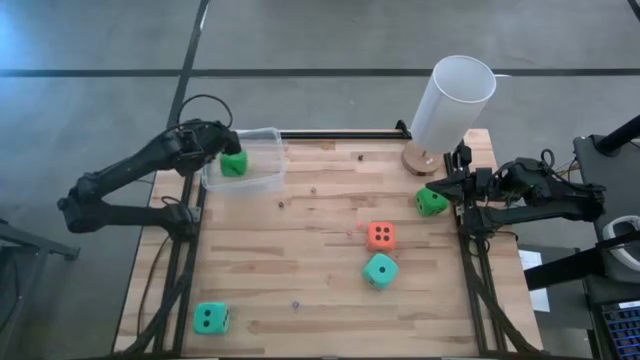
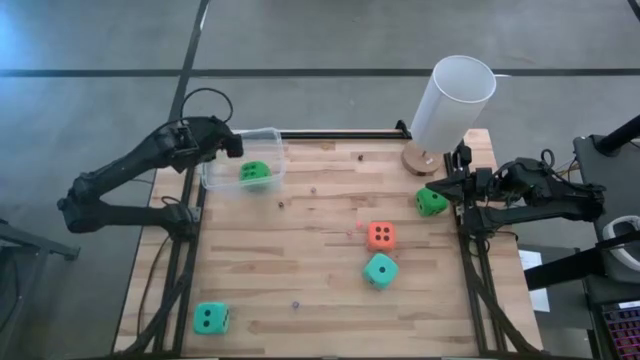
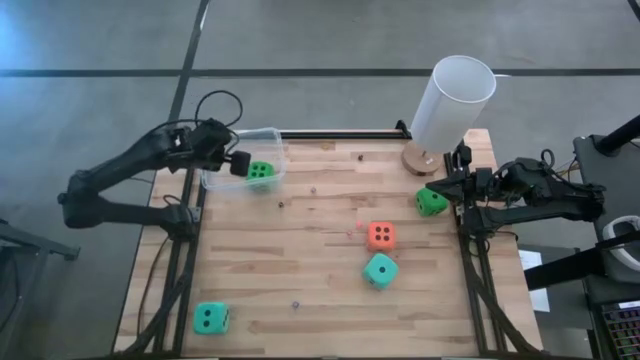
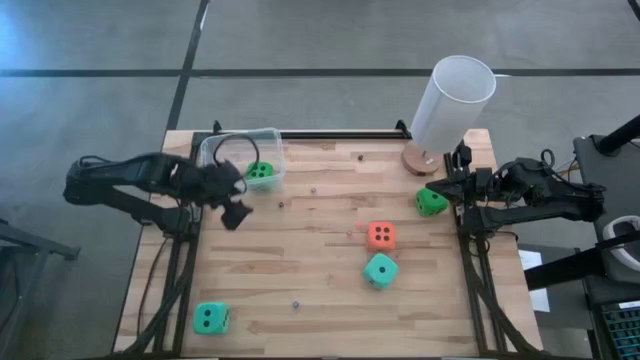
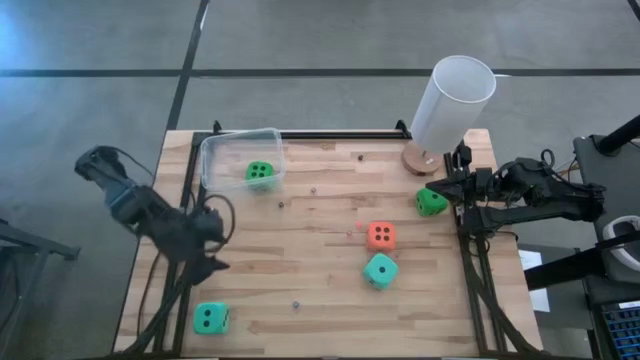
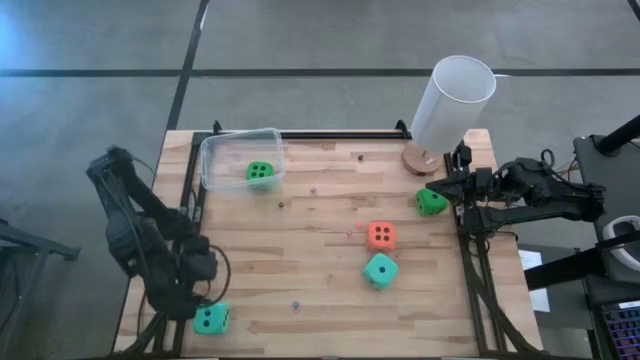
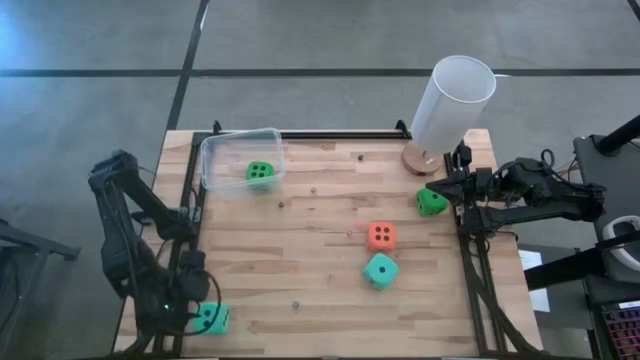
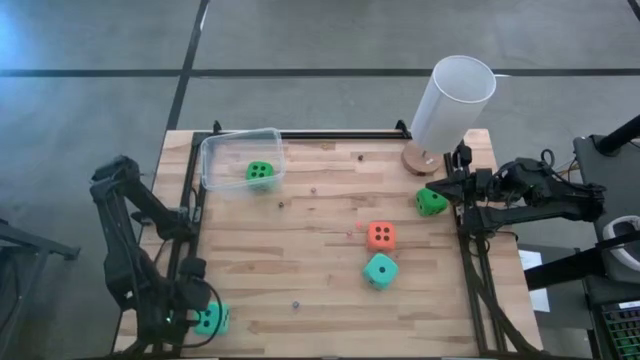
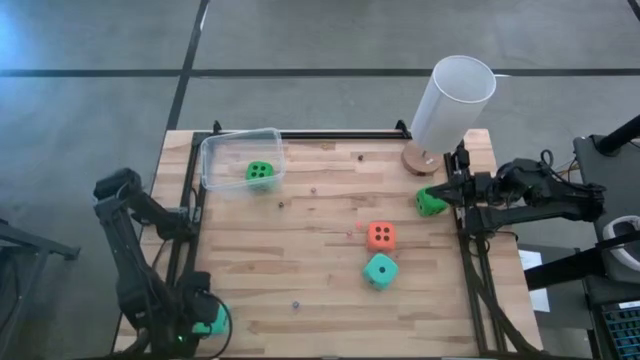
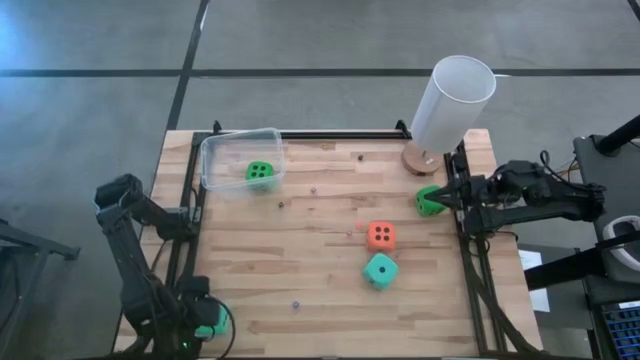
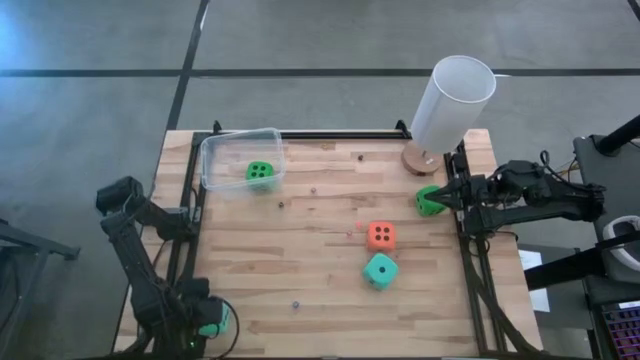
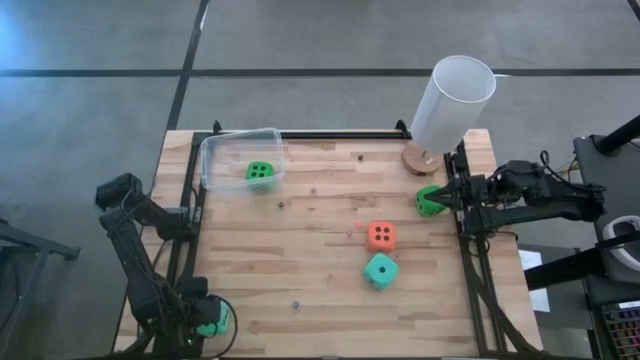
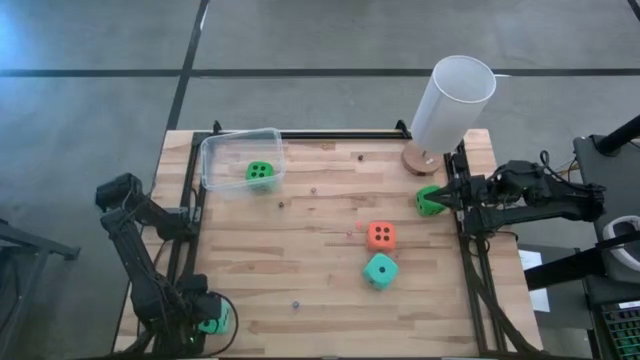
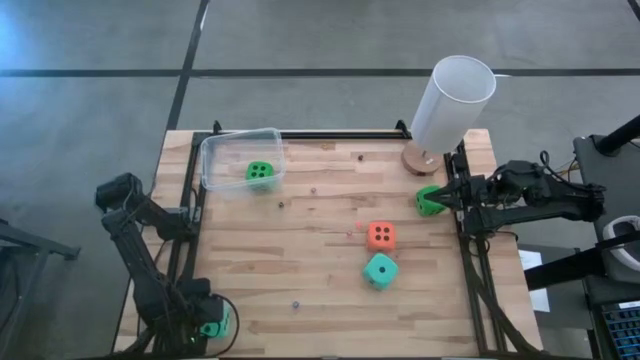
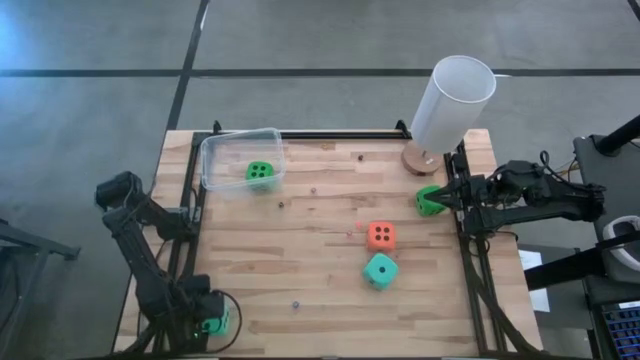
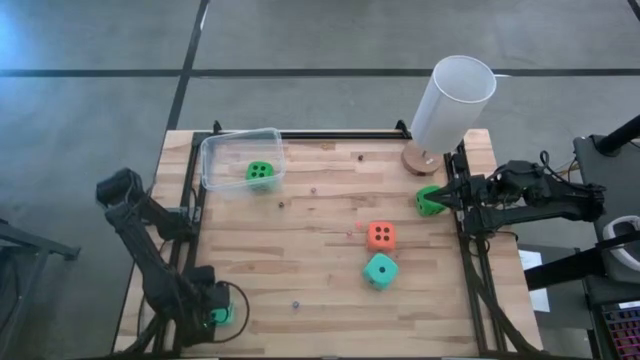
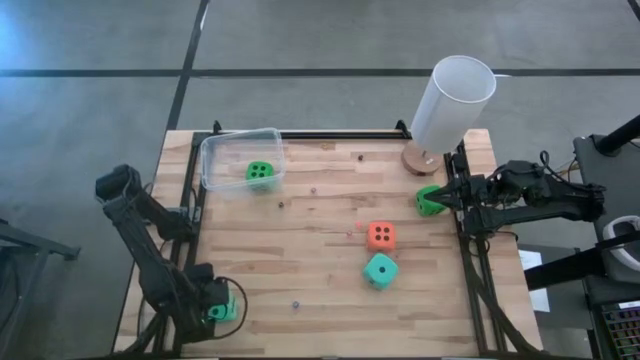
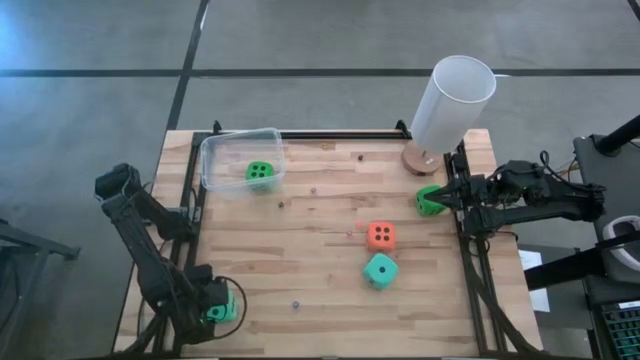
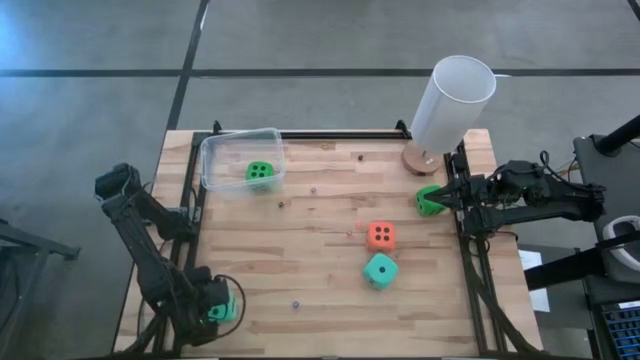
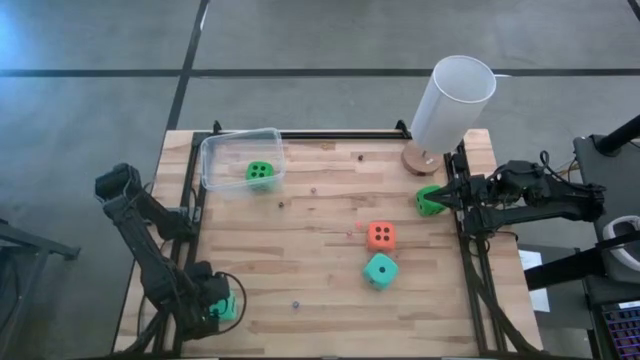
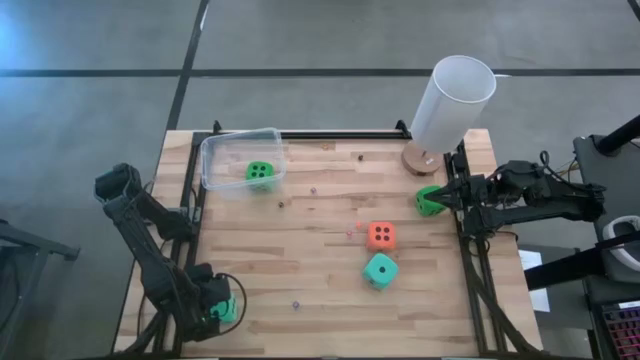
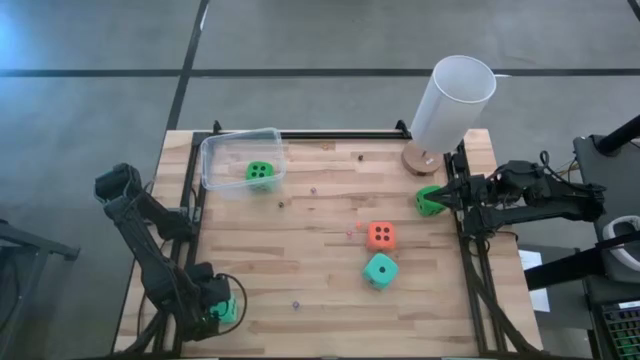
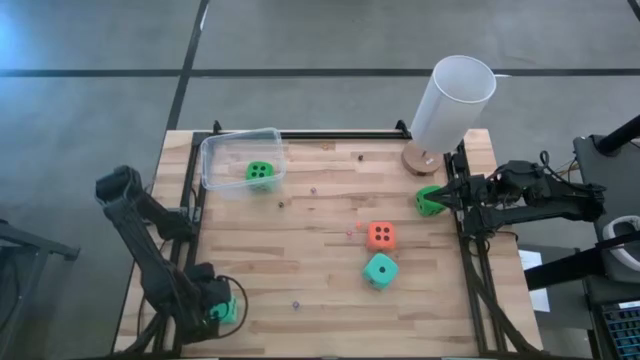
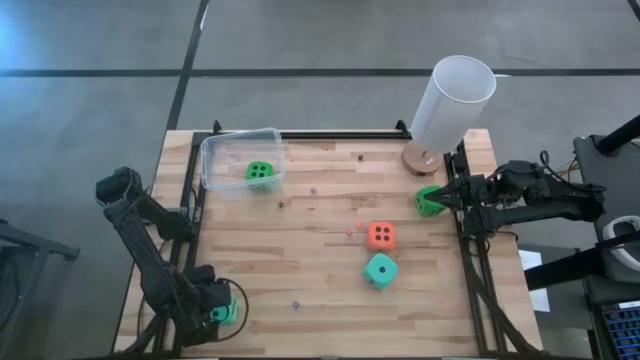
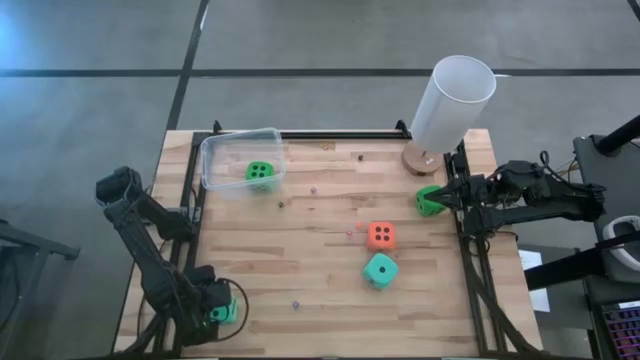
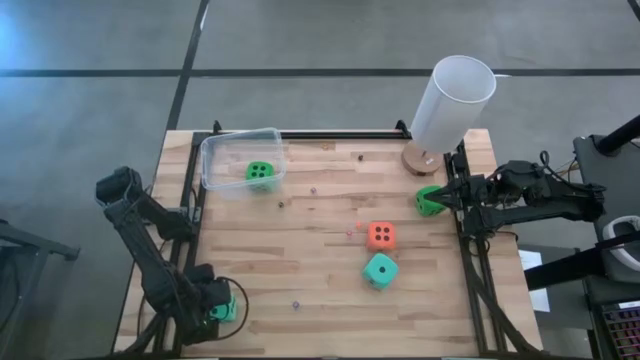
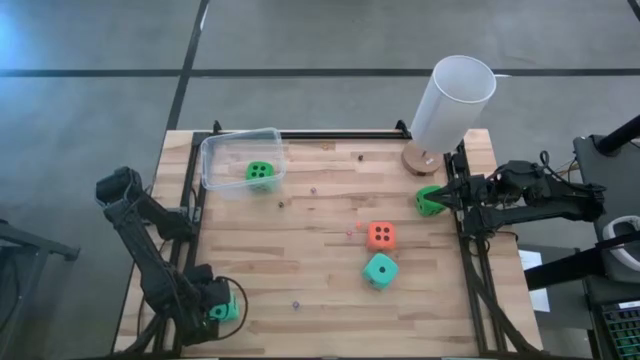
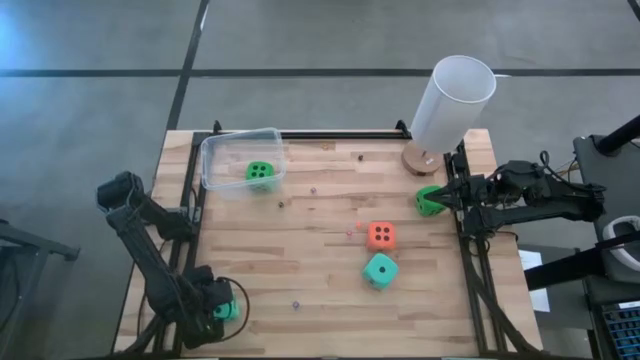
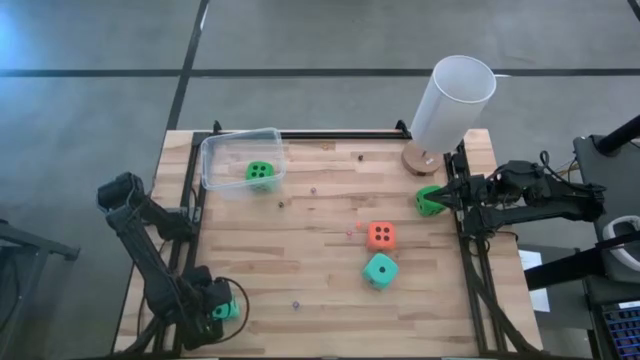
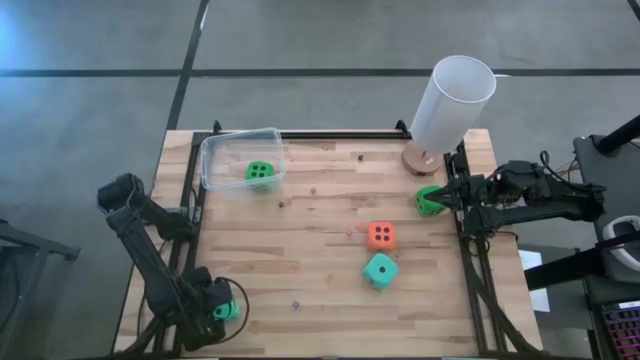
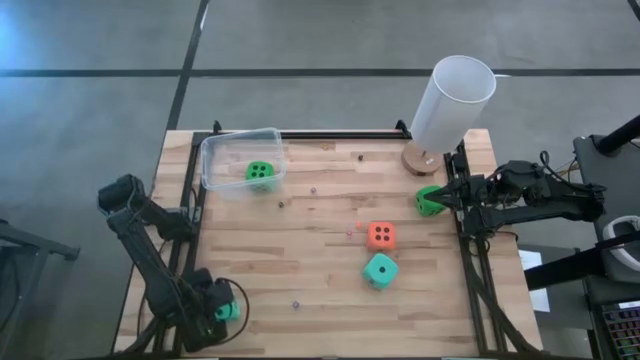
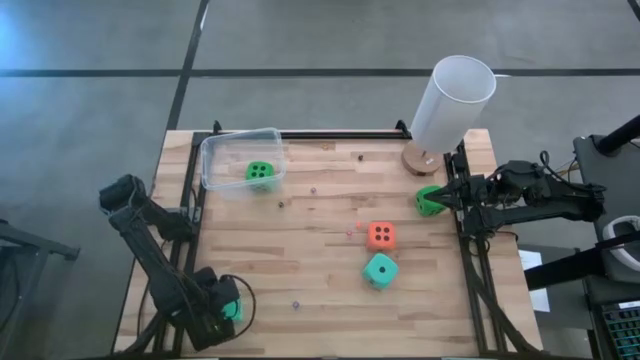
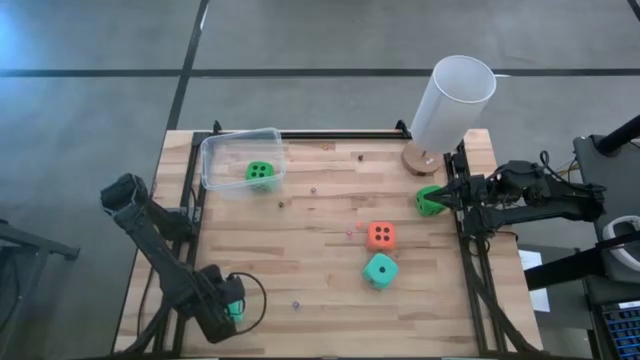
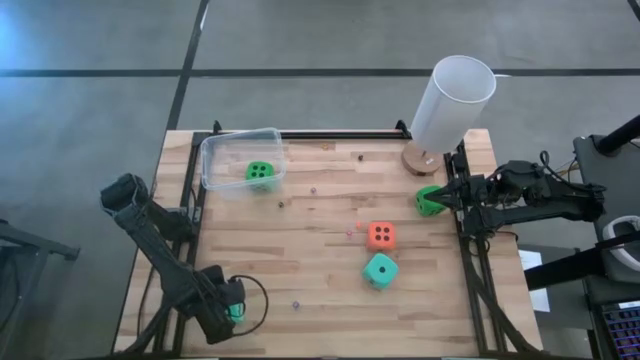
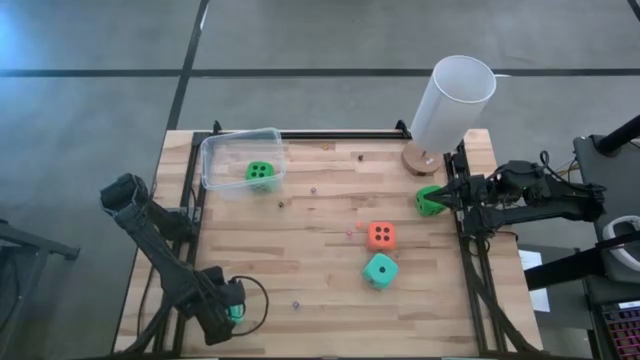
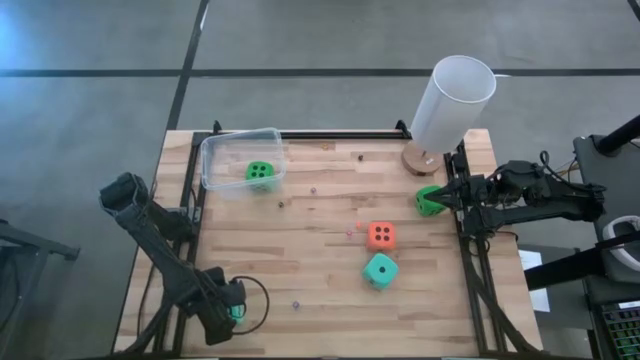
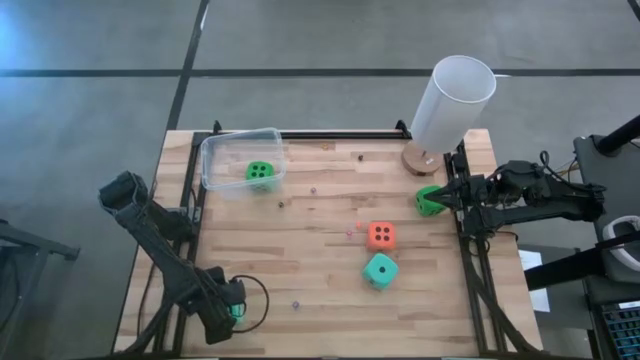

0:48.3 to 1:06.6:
Task: Pick & Place Dice
Put the left large blue dice into the transparent bin

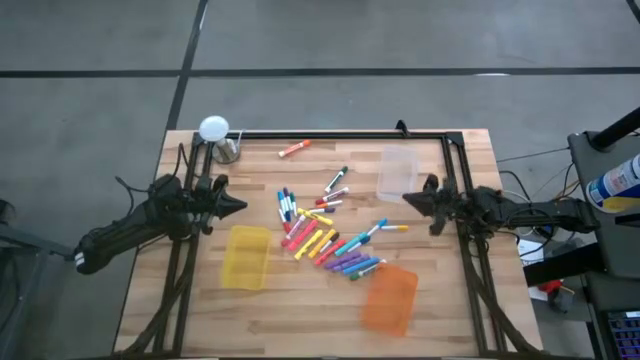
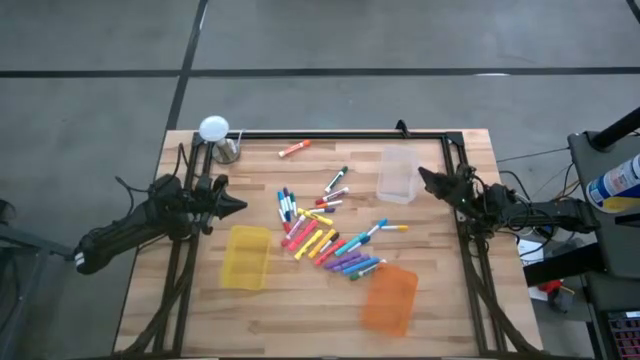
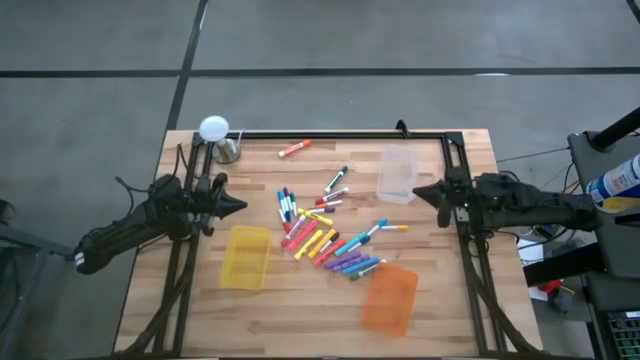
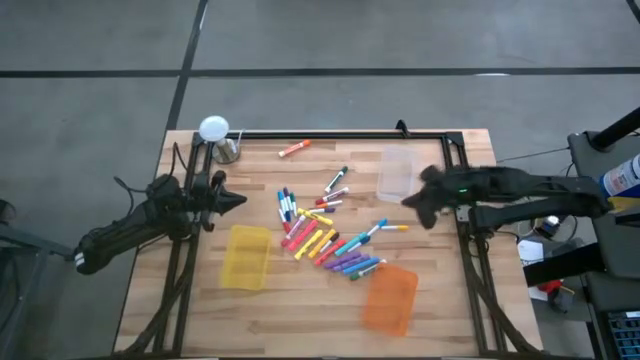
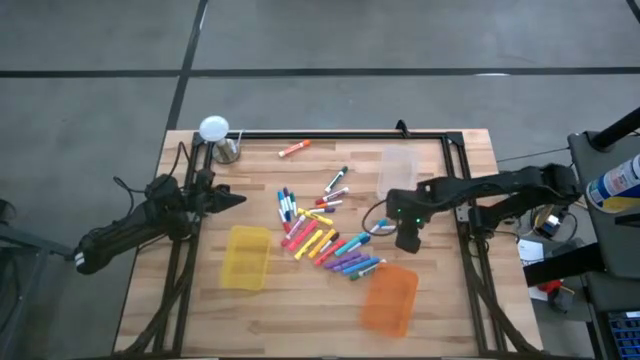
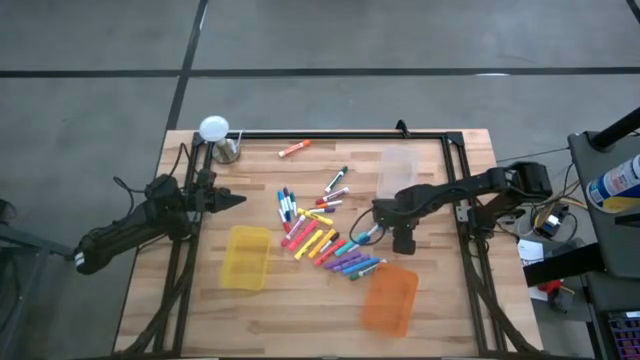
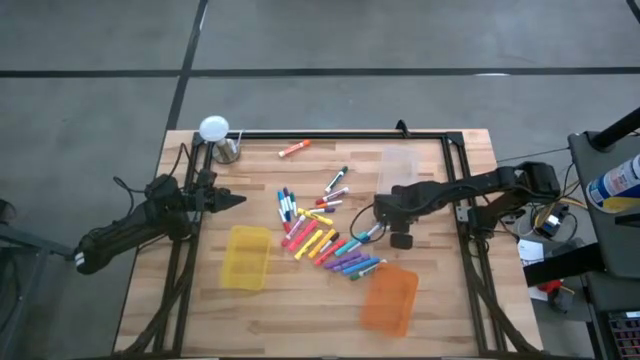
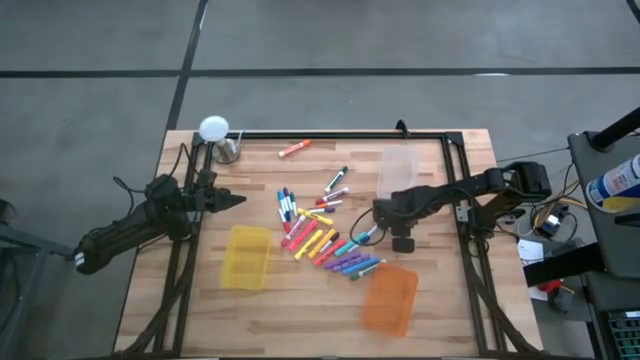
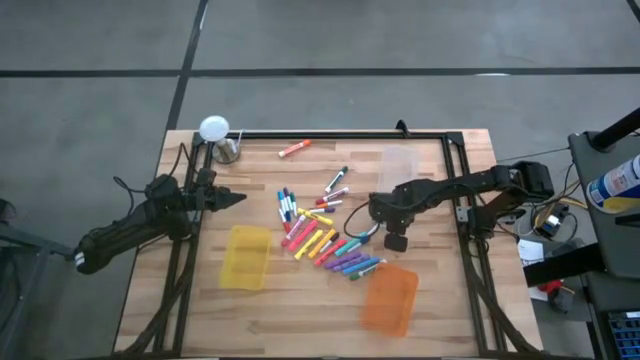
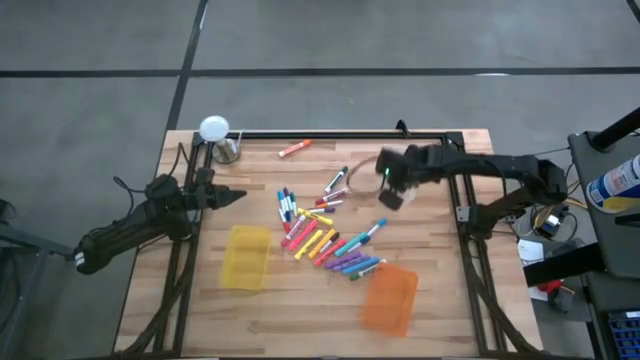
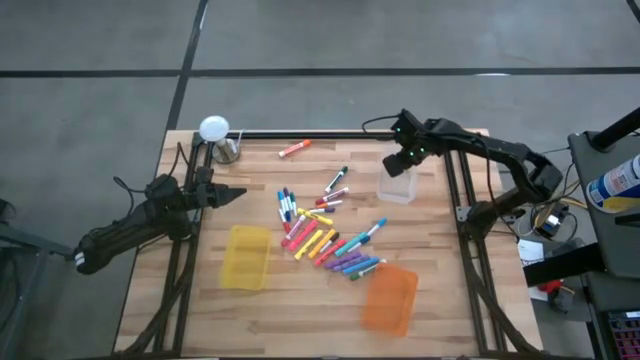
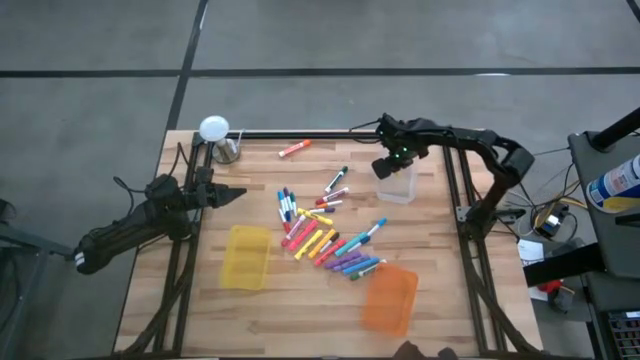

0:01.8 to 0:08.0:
Task: Pick & Place Markers
Put the small yellow highlighter pen into the transparent bin
